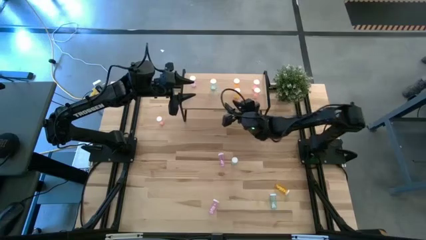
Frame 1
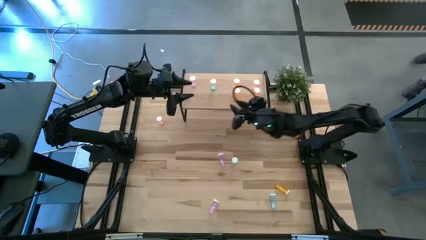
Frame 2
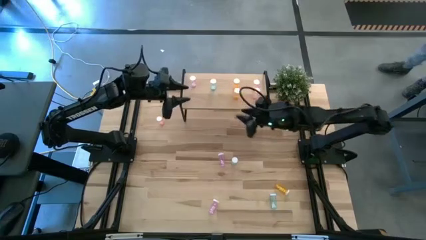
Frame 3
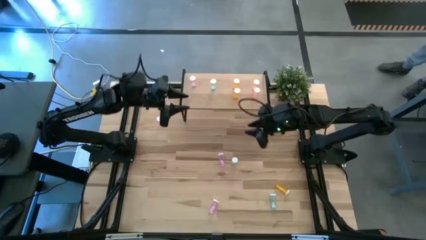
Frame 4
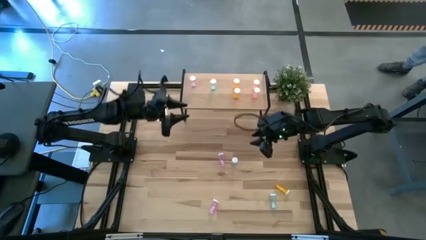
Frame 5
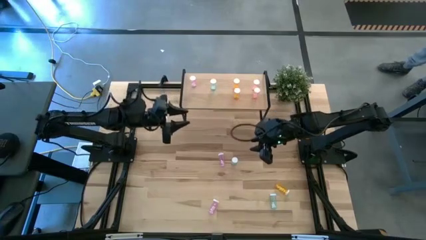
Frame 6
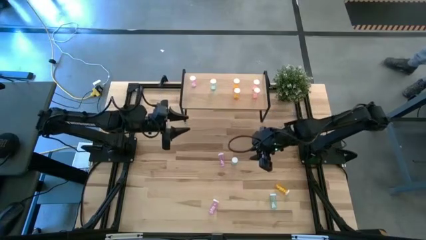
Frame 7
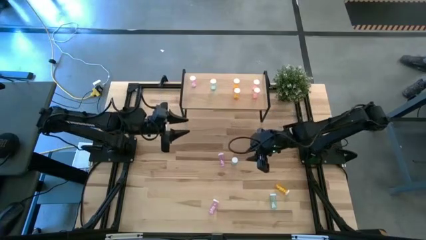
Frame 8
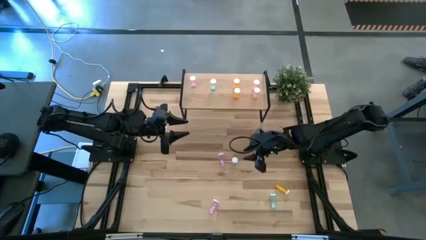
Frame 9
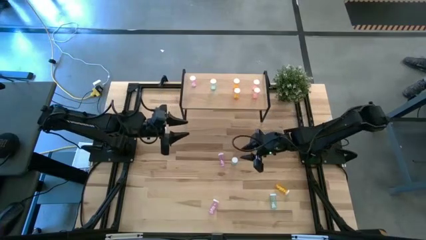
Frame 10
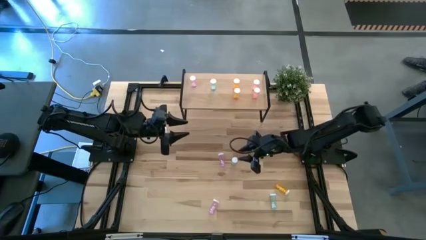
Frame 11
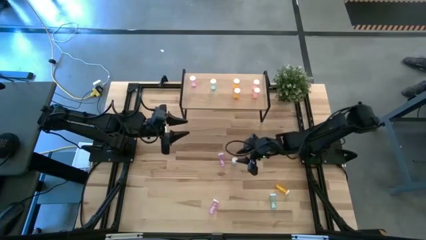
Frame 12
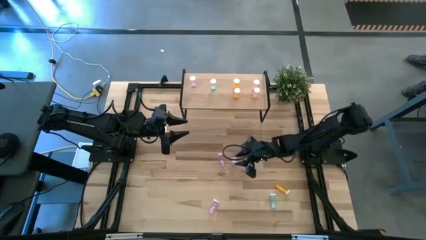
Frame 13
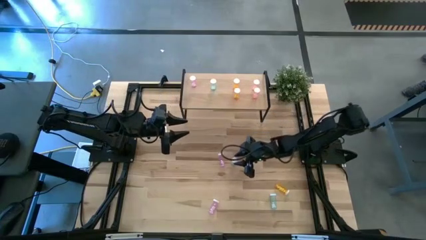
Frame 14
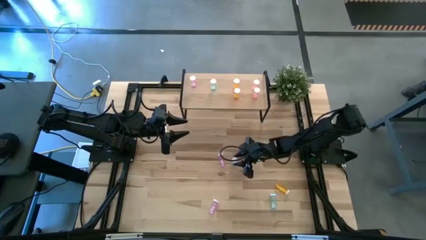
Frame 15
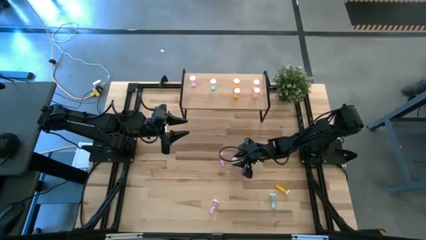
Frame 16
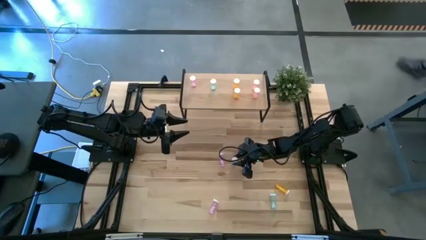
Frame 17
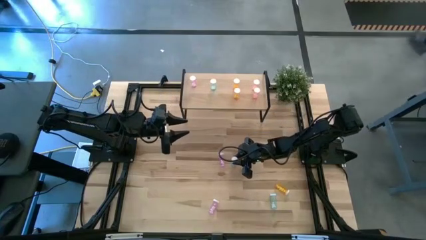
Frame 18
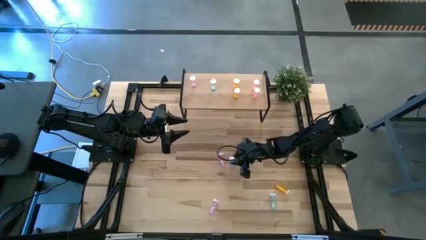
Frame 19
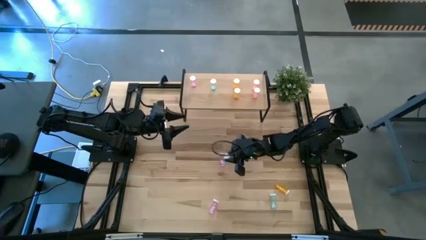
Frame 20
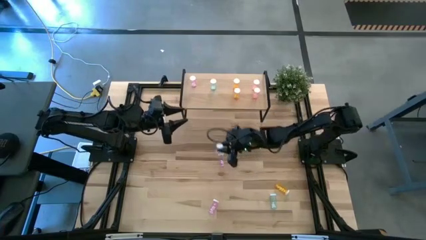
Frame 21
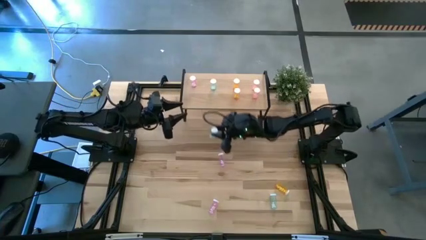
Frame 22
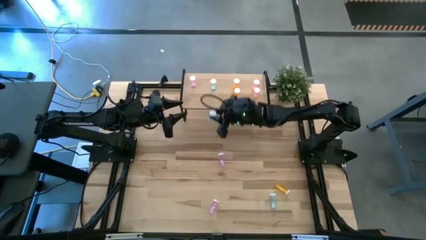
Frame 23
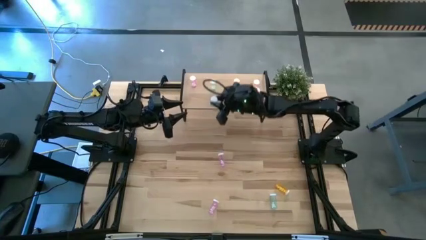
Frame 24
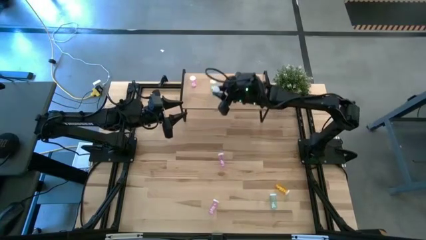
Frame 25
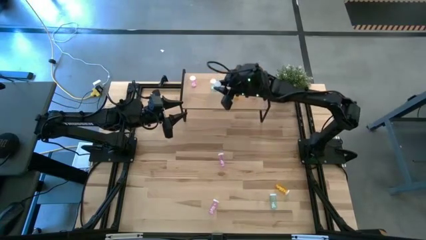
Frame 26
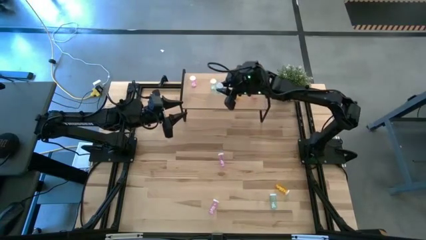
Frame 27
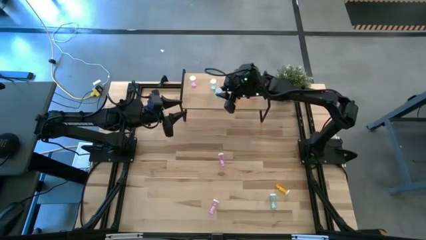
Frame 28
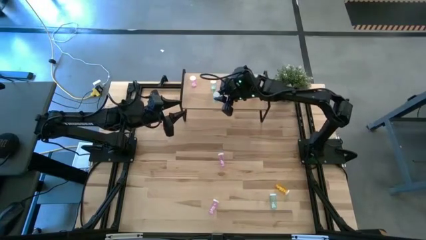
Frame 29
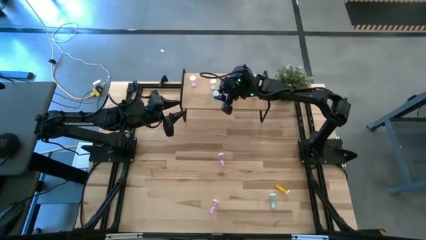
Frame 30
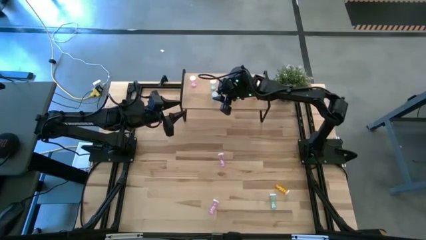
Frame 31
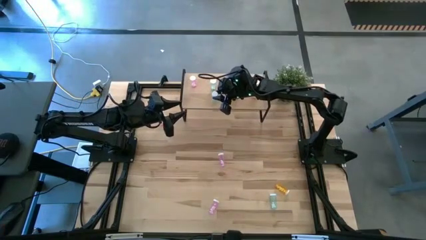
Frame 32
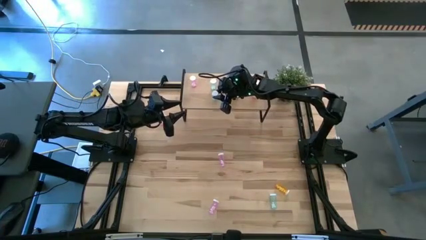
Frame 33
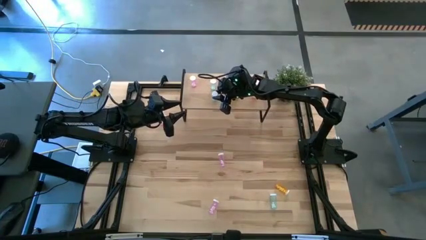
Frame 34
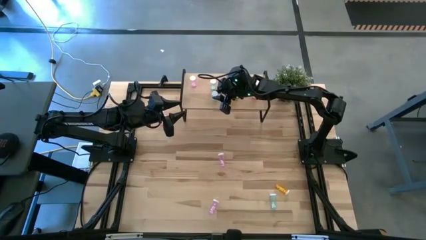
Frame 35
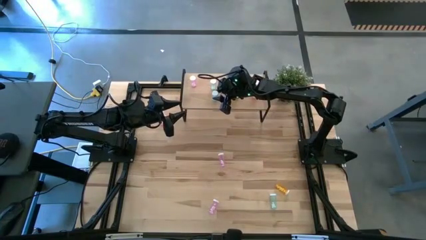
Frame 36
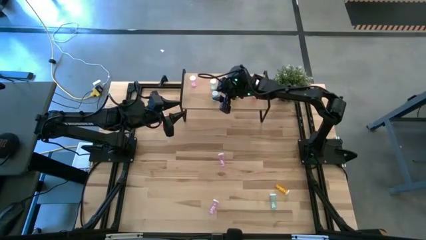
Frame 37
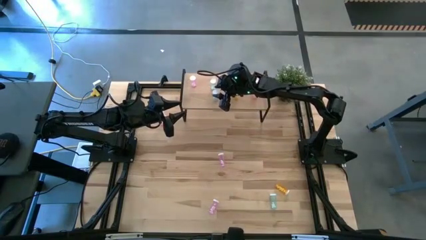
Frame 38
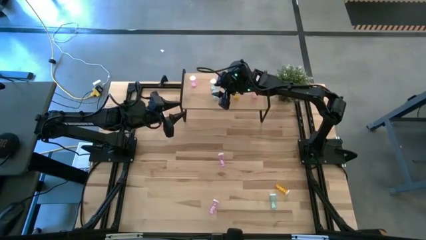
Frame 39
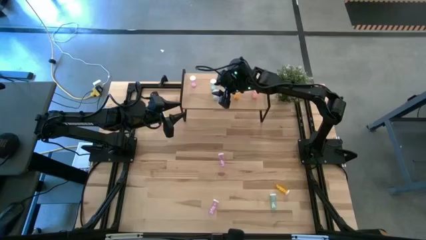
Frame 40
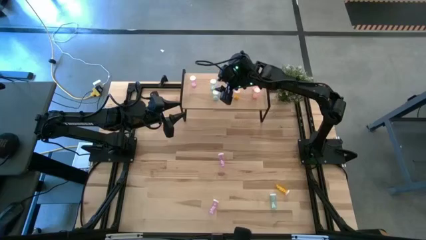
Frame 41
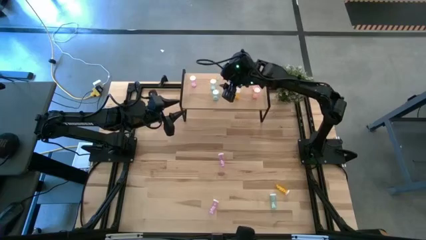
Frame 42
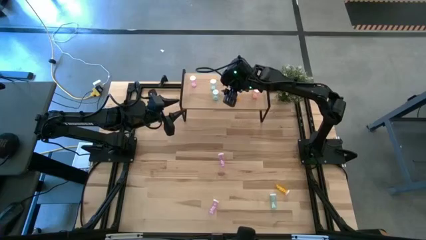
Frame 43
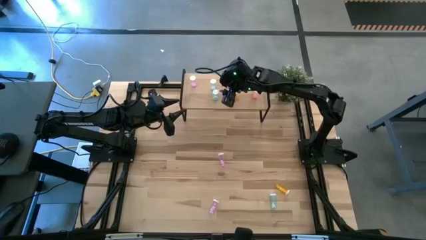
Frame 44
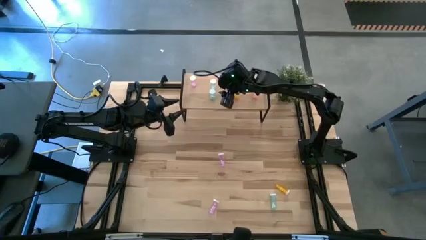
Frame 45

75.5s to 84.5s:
Task: Pick and place medicine bottles onto shelf by color
Put the top blue pill bottle on the shelf aligned with the other blue pill bottle

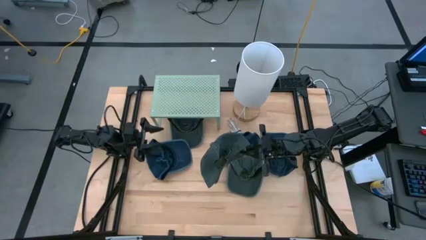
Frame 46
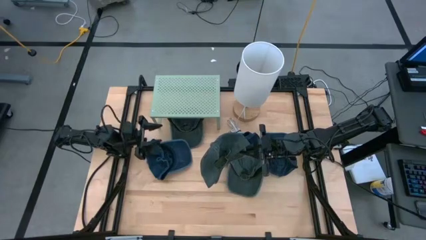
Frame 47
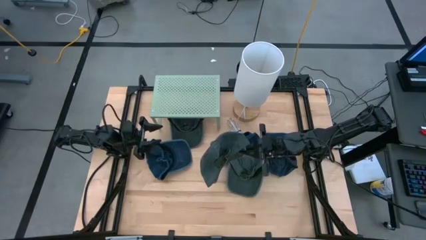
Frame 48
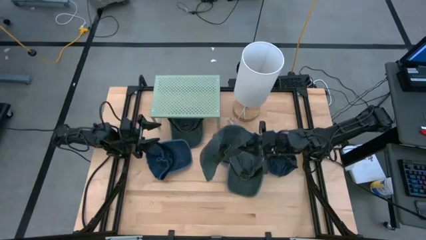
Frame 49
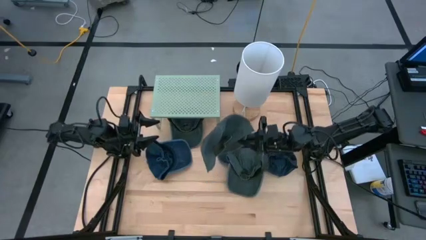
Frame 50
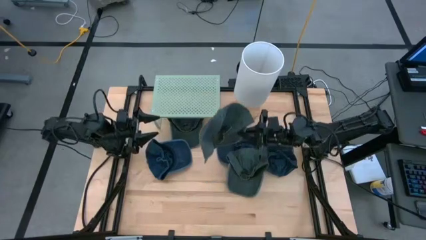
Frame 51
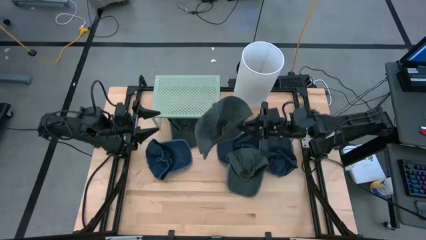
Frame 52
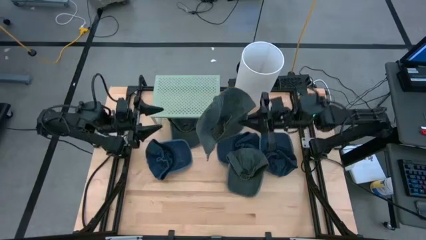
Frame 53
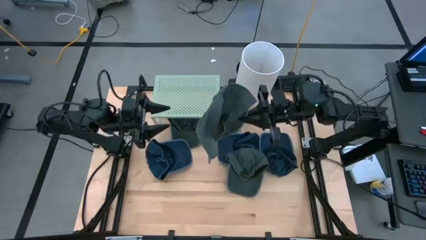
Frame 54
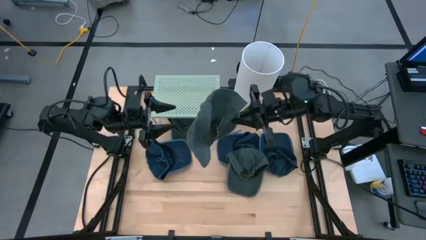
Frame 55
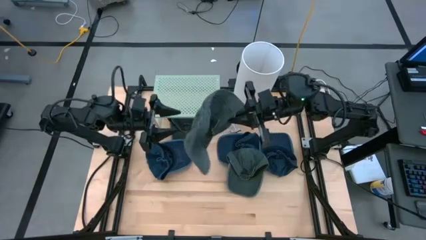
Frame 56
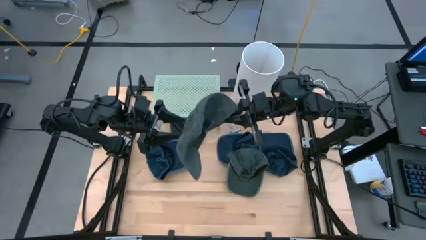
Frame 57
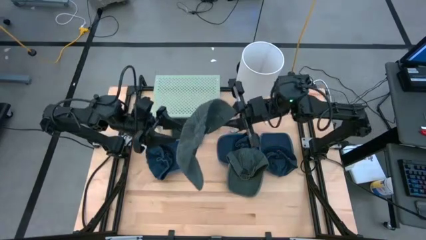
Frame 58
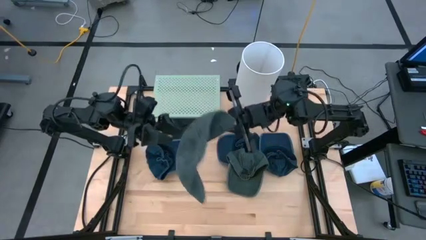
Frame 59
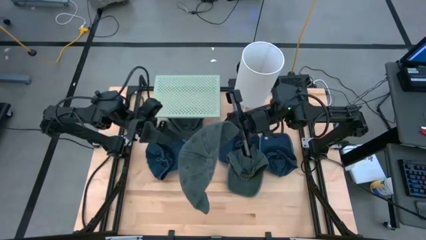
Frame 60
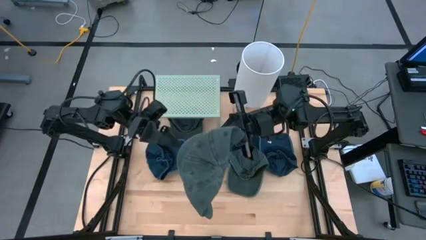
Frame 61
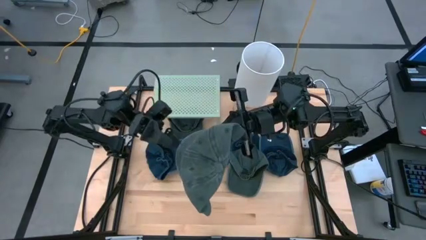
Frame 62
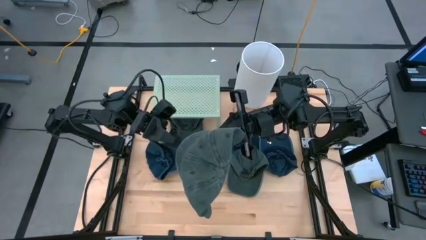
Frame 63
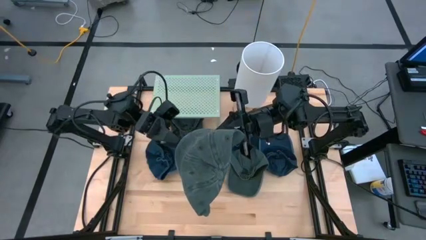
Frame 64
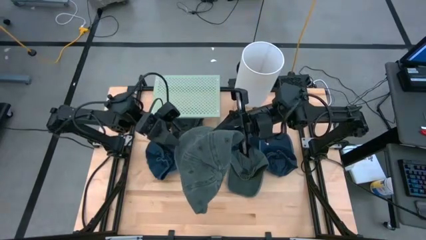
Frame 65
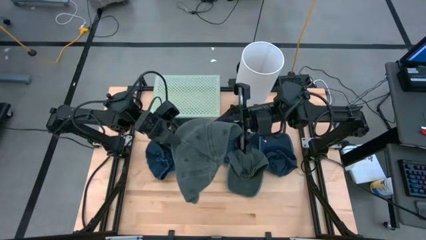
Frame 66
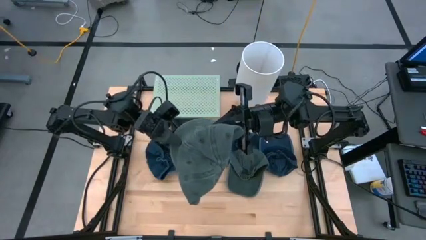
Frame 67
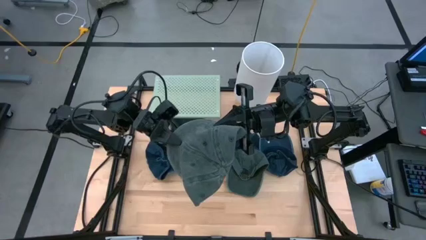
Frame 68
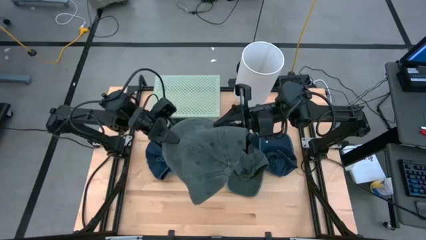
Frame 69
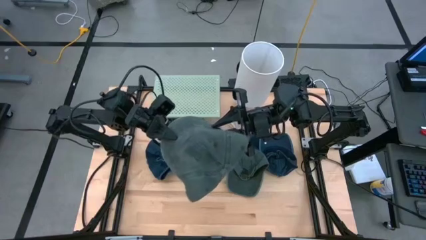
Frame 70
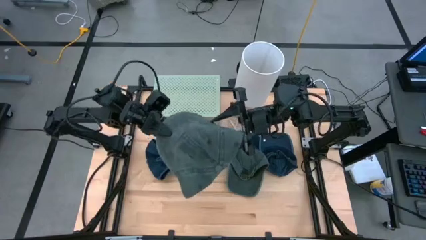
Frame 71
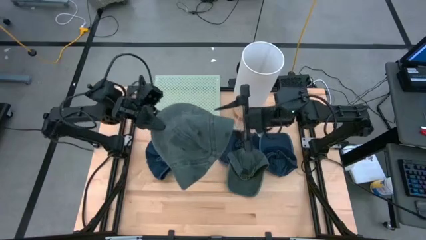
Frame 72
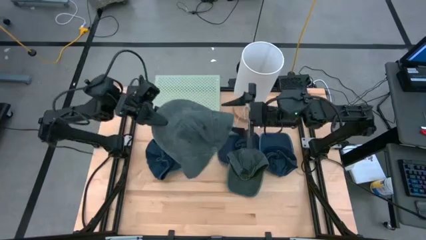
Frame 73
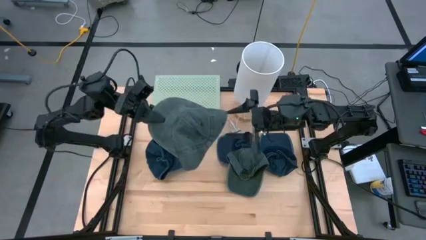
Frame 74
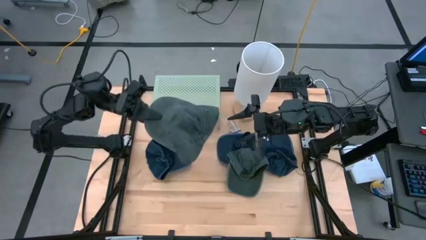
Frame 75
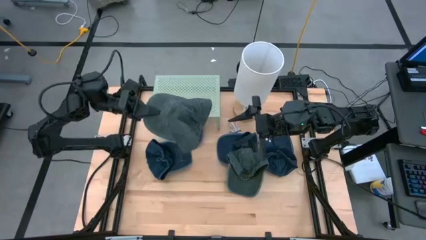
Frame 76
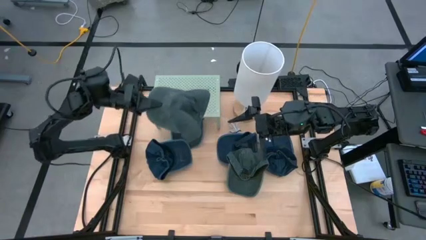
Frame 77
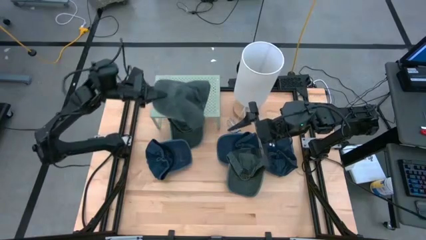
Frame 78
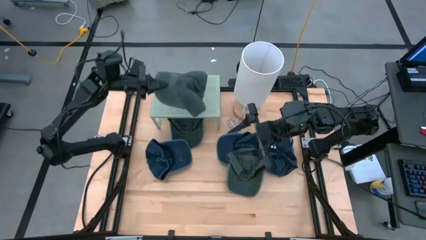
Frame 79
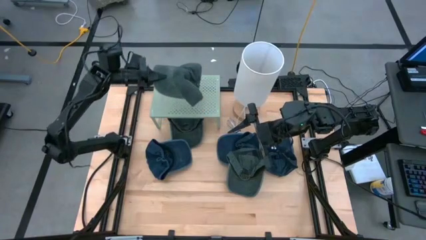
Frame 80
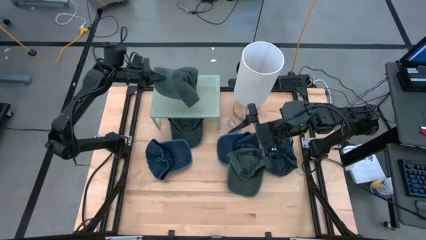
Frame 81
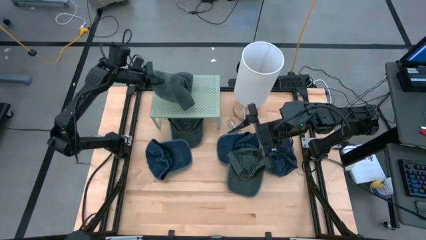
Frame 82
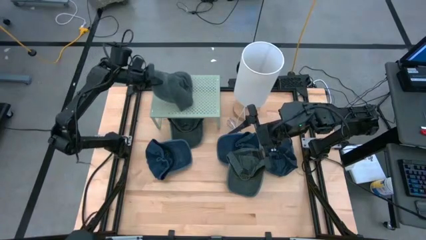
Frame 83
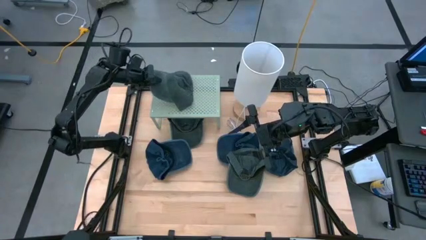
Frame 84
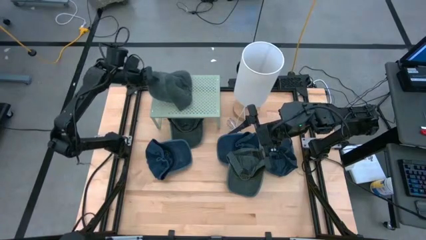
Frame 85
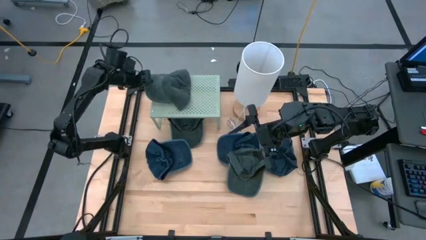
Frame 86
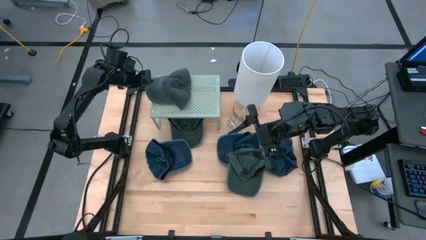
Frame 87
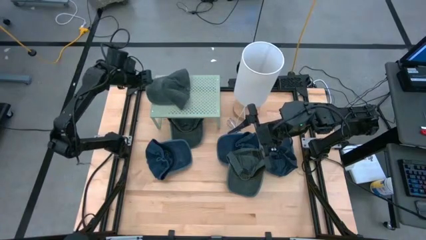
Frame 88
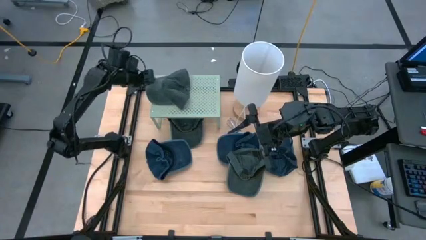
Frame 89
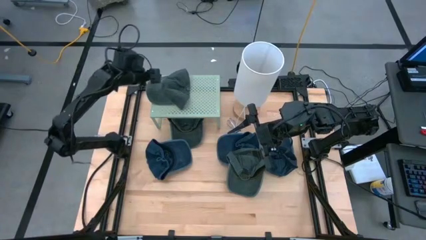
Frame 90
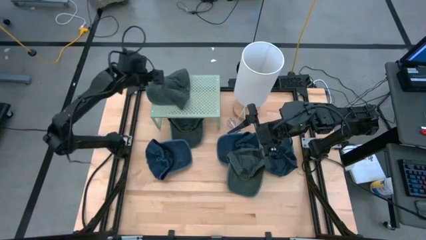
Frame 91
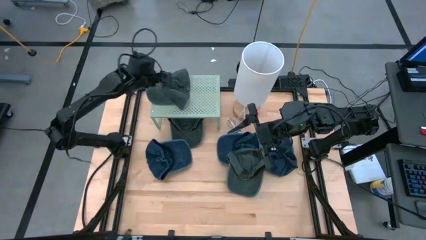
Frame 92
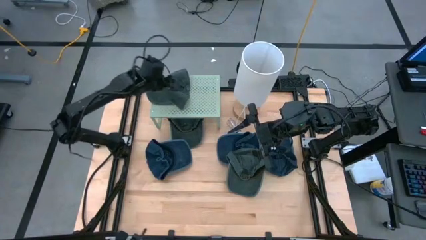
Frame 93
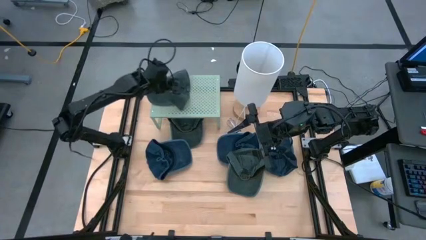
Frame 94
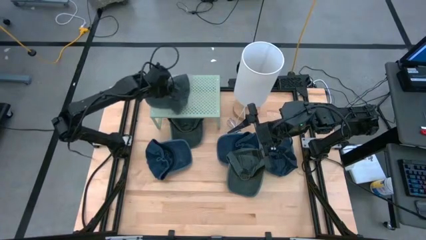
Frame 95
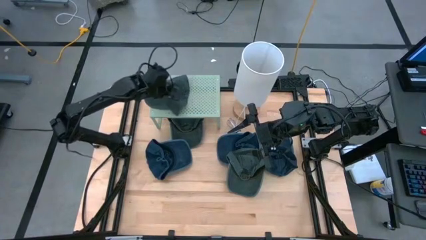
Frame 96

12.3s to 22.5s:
Task: Pick & Place hat
Put the right gray cap on the shelf
